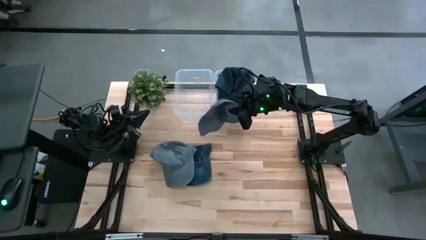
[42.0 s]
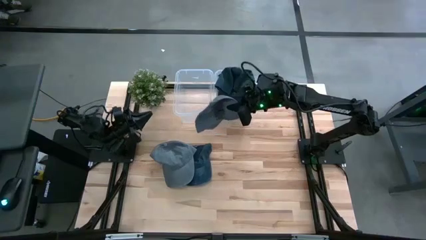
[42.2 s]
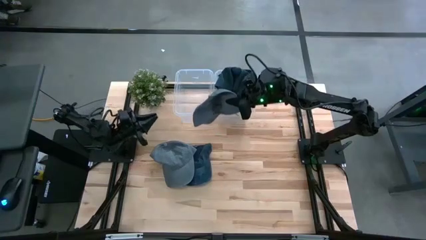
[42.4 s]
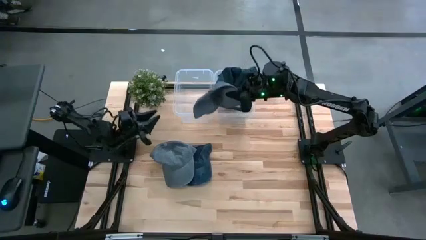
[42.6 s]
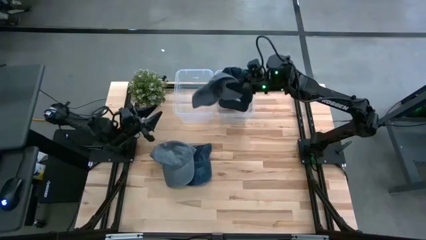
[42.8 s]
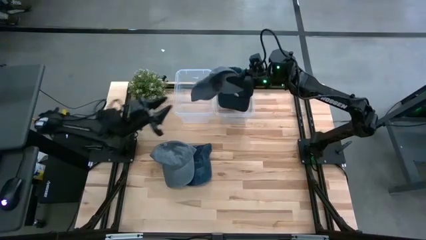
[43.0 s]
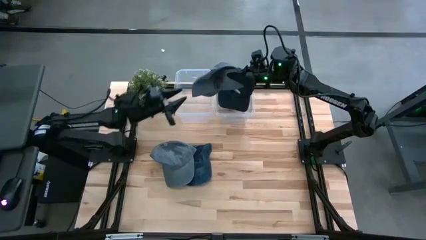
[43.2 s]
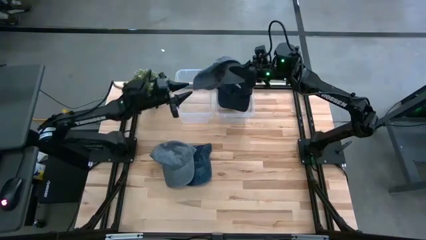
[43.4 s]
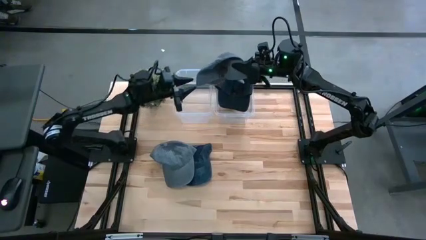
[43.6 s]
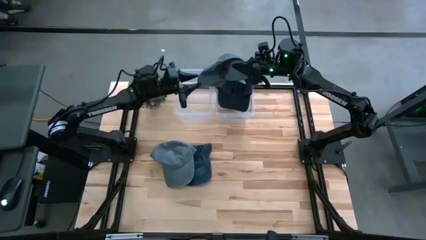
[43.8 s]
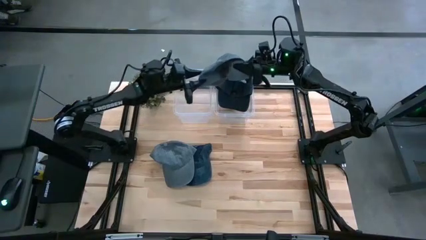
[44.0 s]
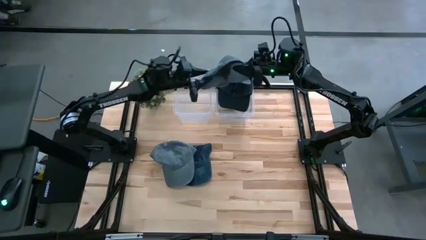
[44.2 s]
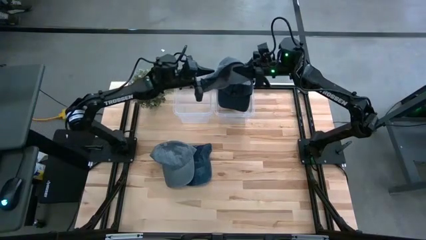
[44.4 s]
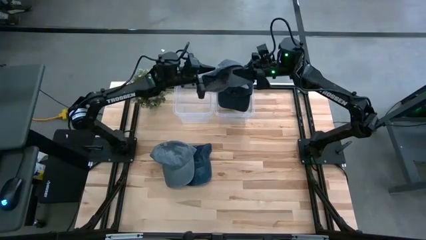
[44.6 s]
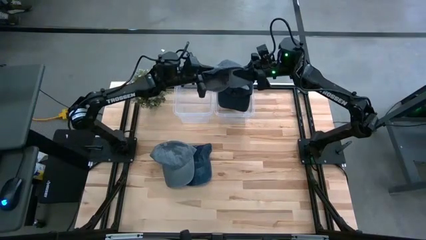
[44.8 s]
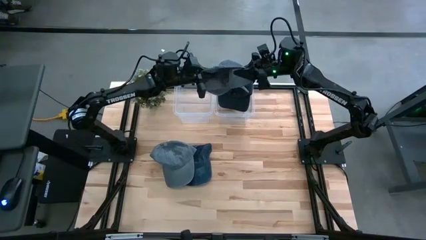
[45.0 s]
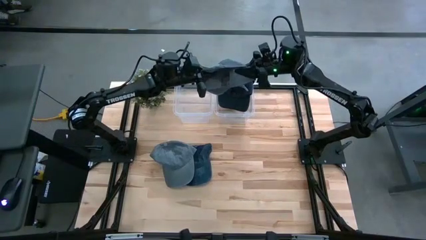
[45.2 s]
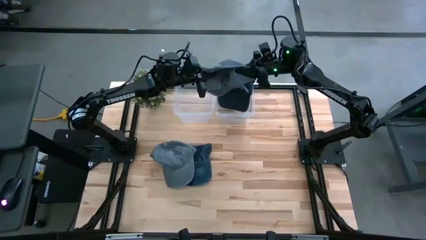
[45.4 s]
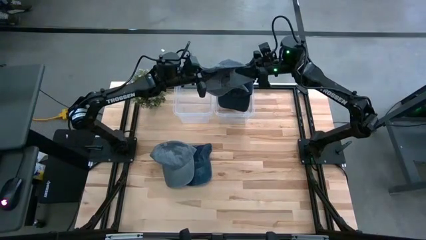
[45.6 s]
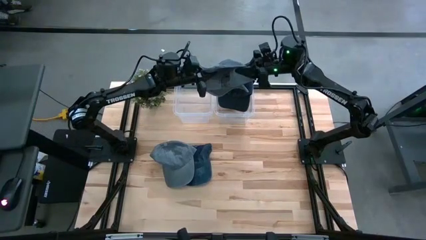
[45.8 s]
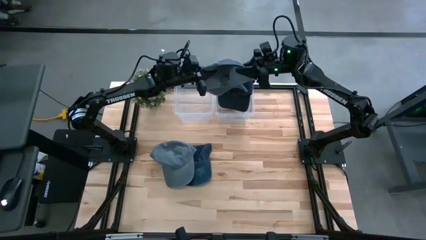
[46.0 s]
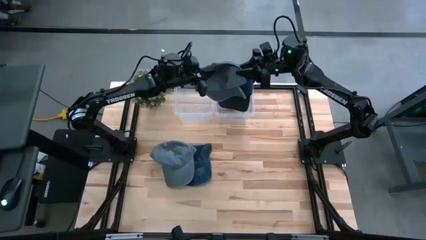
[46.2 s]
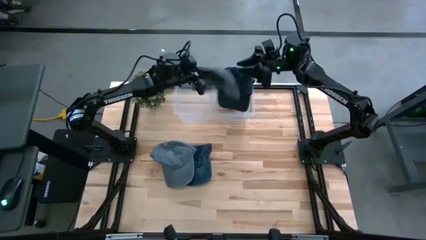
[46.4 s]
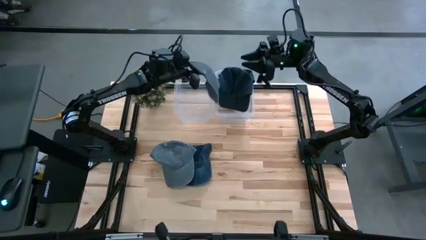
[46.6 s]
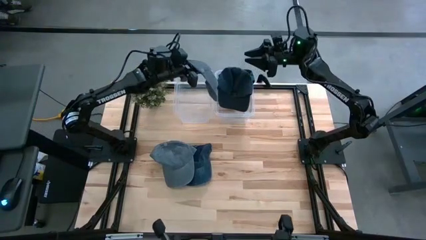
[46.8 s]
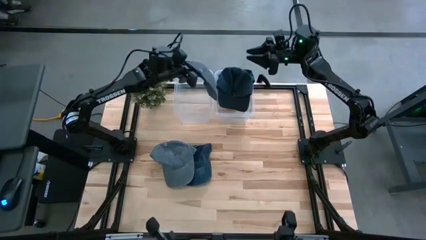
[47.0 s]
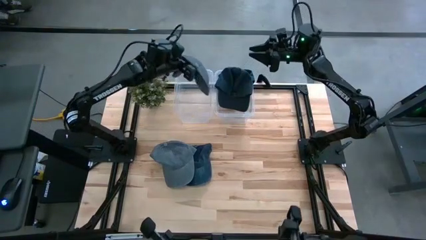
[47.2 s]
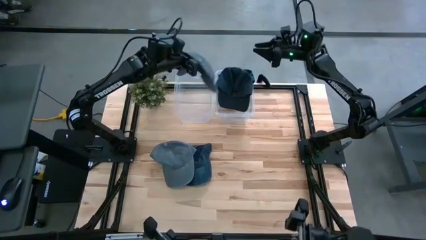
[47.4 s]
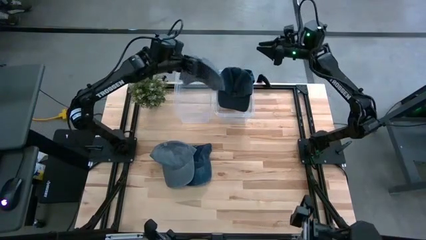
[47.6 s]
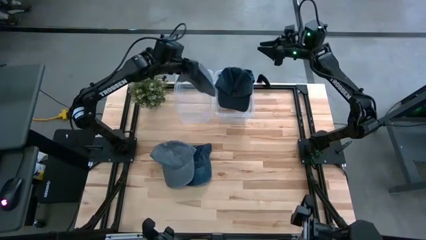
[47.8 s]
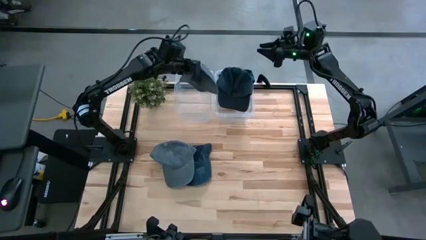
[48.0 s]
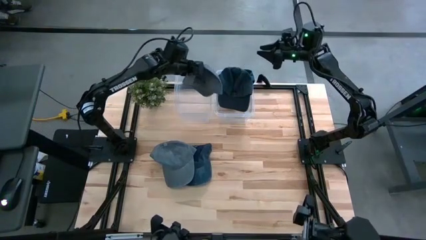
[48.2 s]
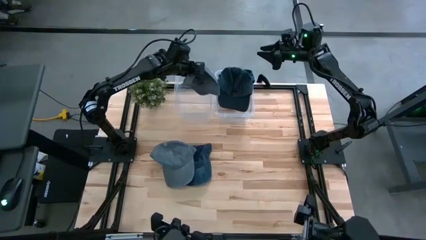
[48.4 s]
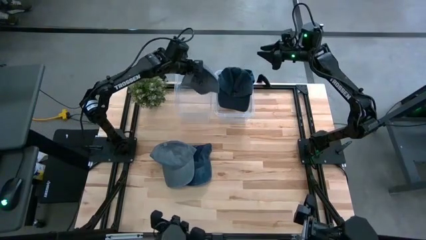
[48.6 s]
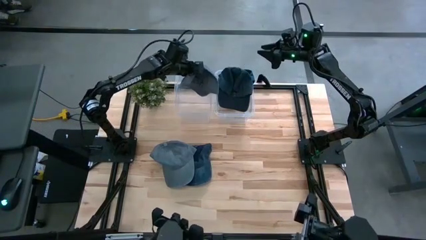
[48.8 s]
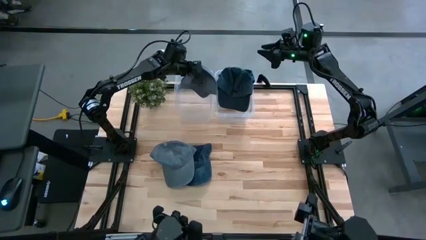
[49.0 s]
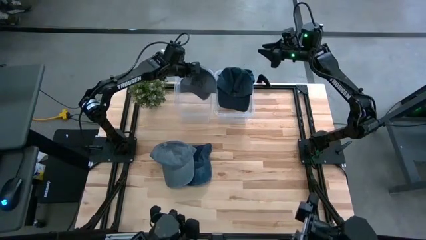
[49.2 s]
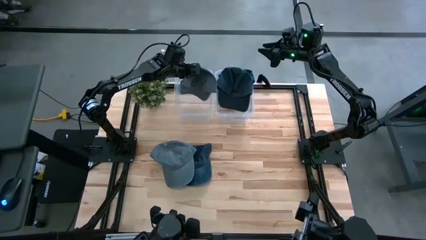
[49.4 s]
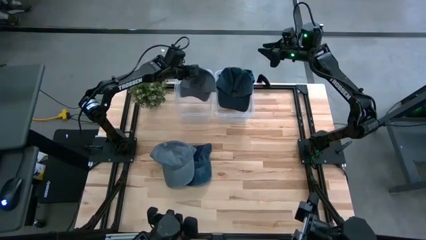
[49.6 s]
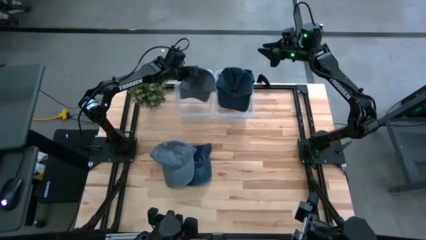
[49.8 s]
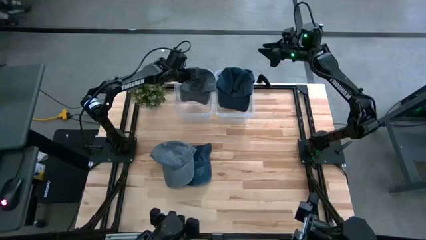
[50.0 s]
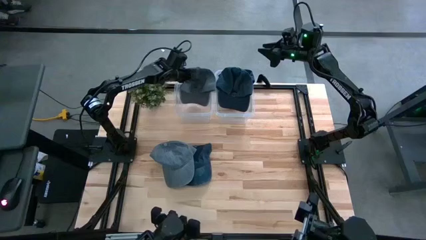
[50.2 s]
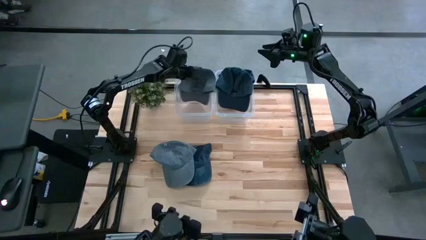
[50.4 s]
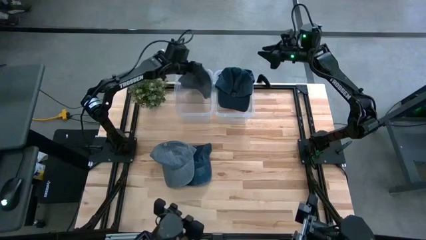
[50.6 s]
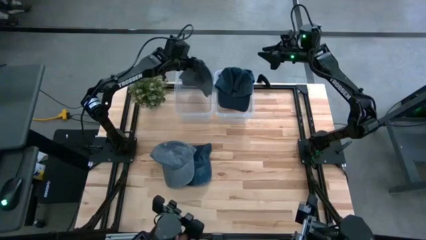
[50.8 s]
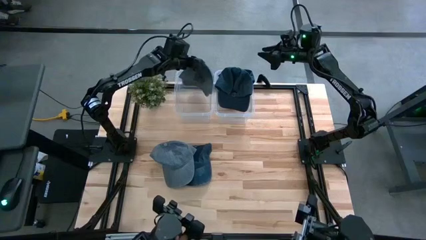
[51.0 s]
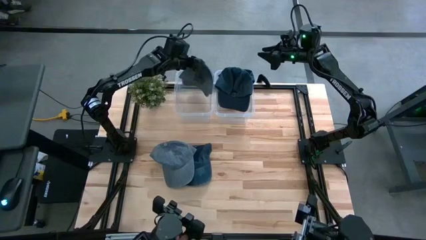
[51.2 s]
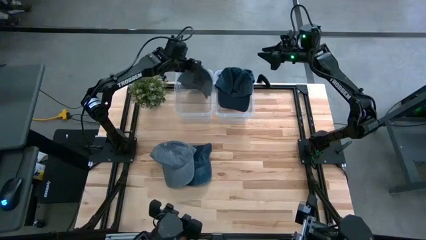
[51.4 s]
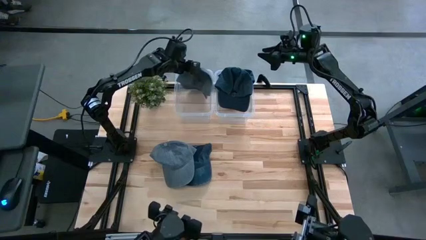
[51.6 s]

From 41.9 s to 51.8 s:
Task: Pick & Place hat
Put the right gray cap into the left transparent bin

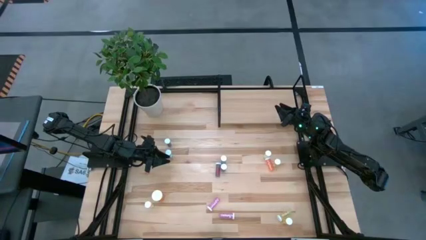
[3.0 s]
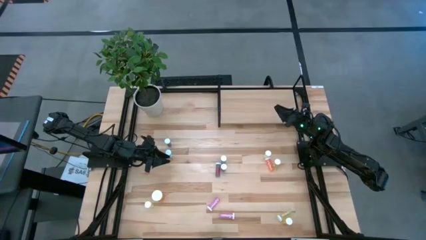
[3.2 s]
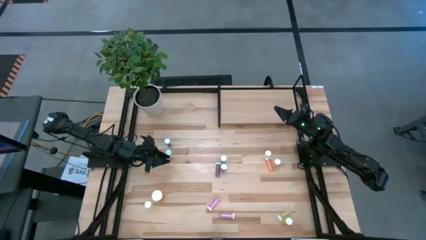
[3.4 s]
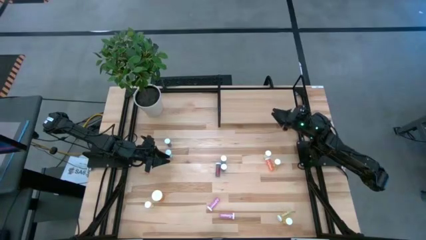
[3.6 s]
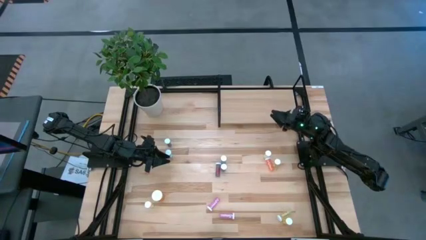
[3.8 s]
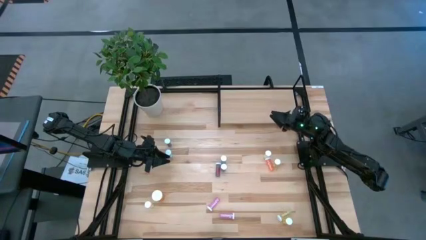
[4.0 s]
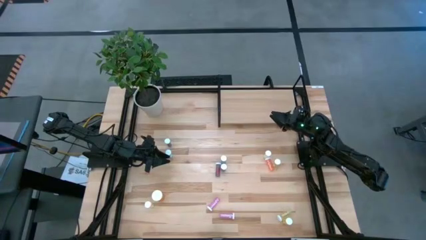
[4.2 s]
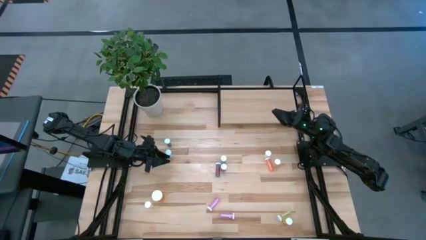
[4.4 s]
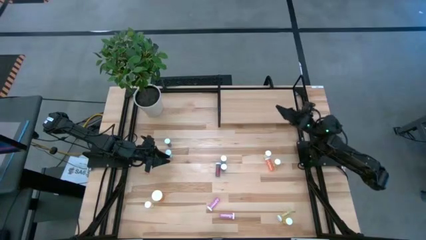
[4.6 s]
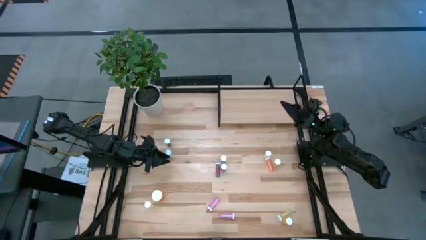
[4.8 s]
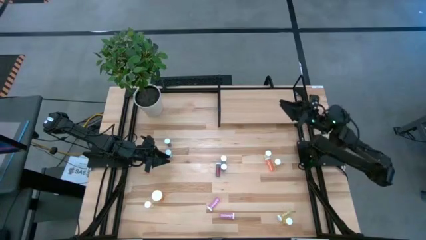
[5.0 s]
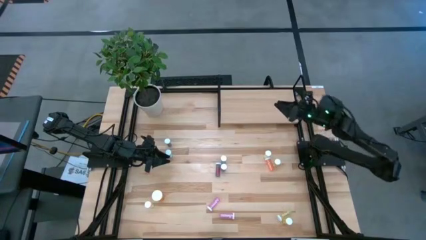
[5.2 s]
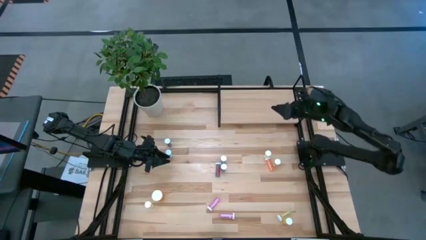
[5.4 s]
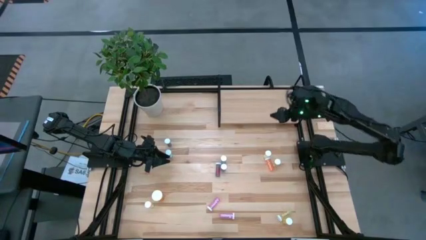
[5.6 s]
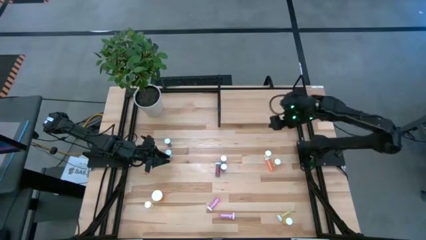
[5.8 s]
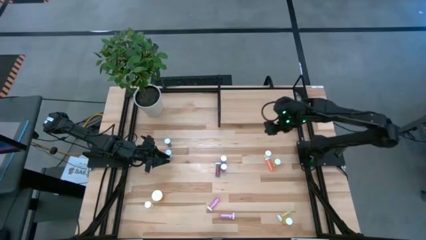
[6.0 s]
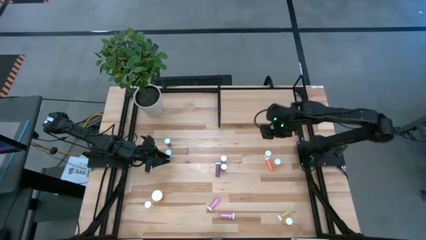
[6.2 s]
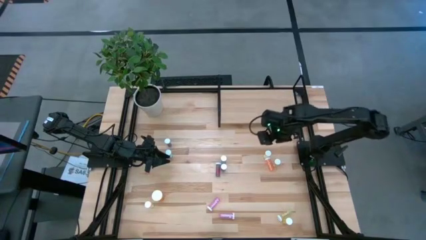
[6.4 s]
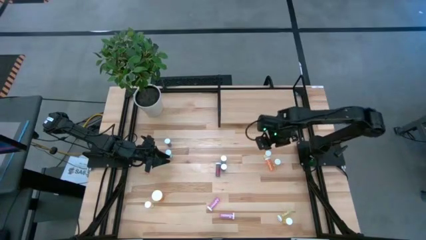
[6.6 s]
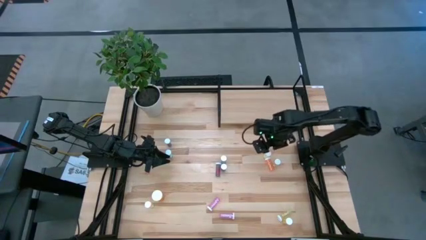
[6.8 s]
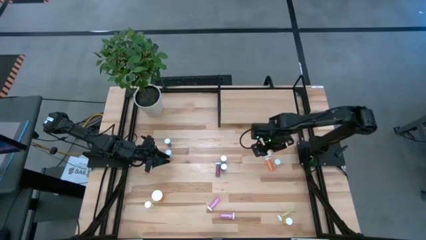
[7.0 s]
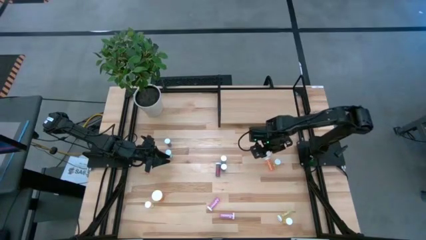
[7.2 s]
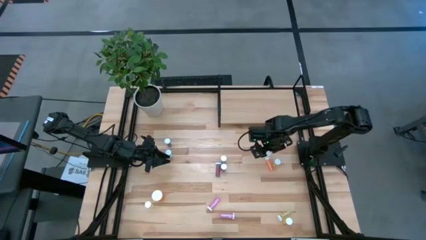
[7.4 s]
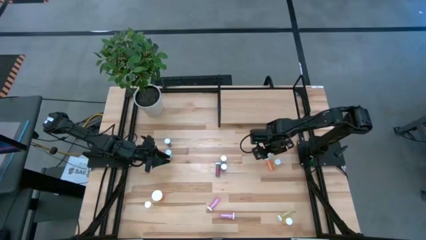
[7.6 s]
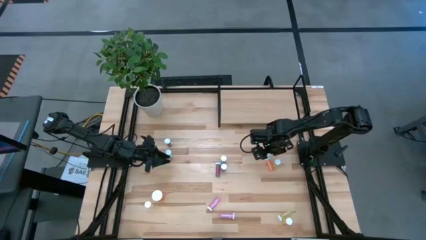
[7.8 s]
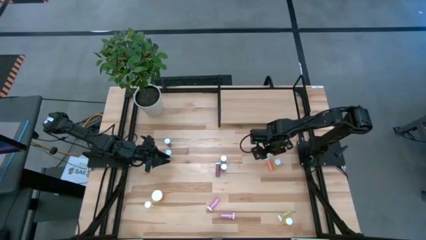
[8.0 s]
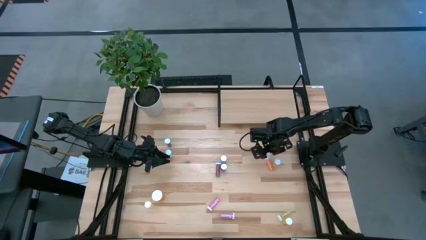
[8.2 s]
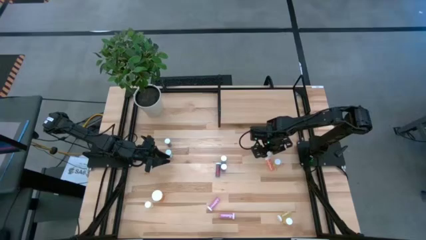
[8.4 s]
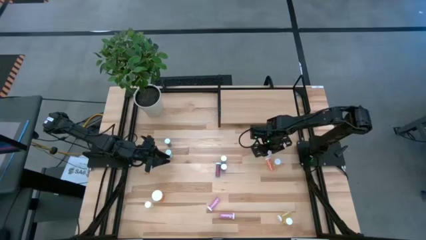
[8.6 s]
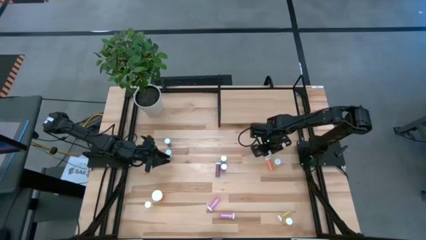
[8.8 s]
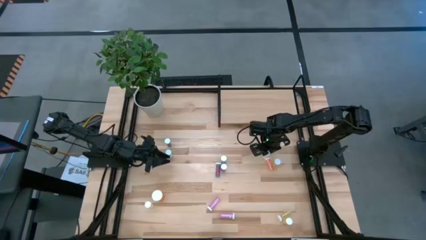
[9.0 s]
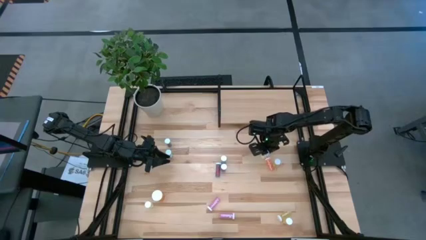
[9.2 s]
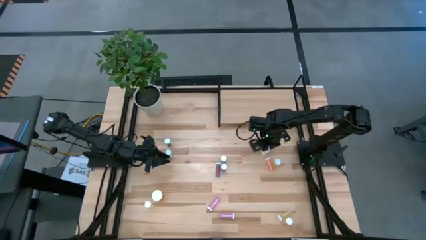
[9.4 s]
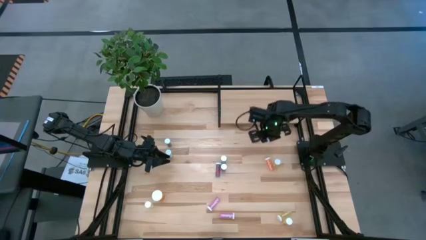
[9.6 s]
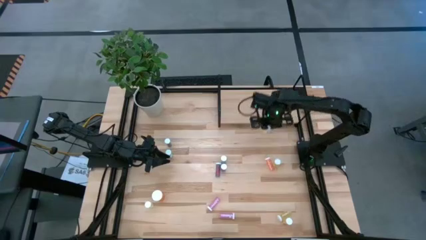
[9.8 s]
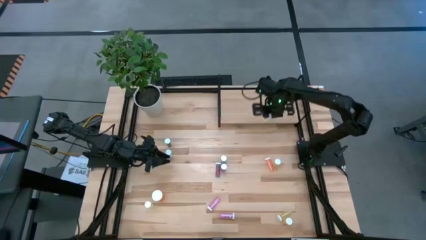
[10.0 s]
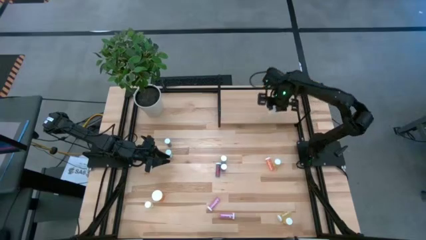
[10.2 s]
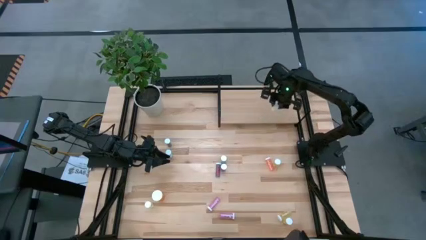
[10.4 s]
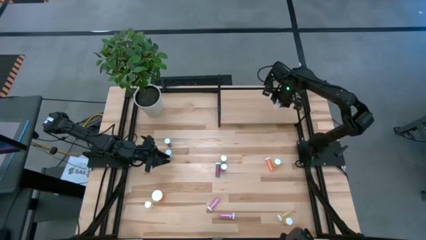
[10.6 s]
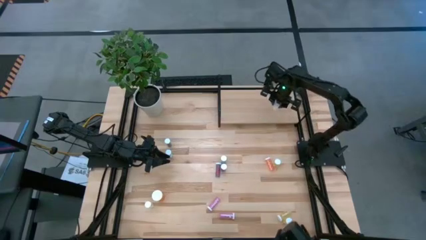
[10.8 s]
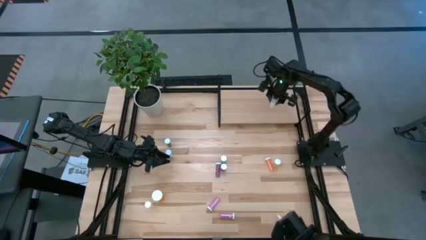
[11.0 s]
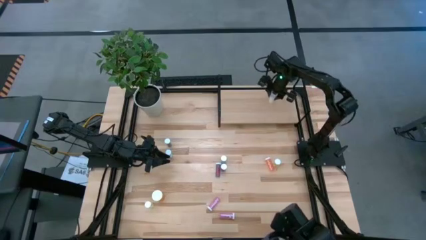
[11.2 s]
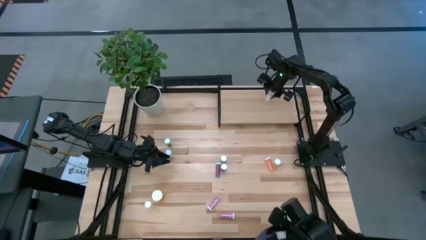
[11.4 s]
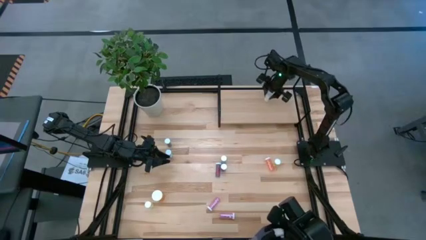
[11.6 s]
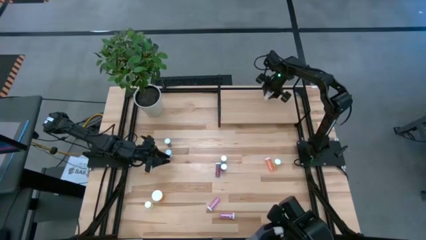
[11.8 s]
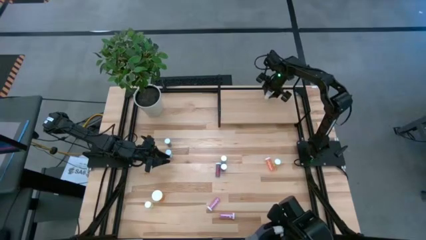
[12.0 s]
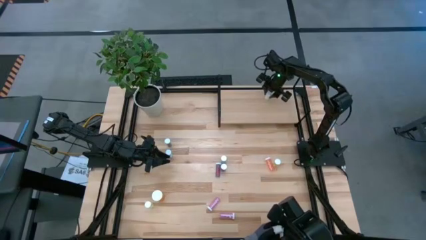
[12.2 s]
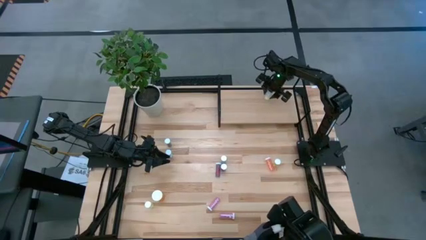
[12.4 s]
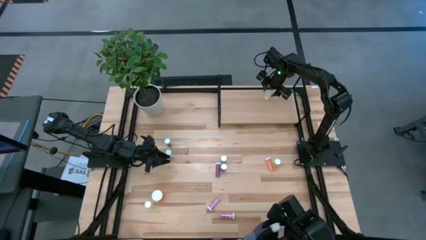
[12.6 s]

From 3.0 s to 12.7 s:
Task: Pick and place medicine bottles onto shelf by color
Put the yellow pill bottle on the shelf
